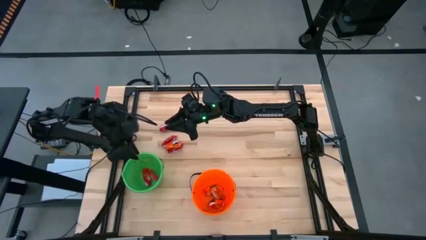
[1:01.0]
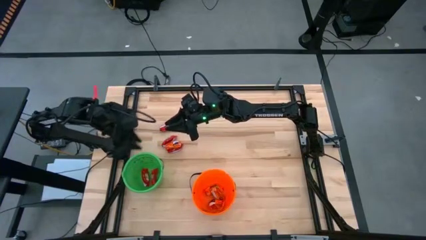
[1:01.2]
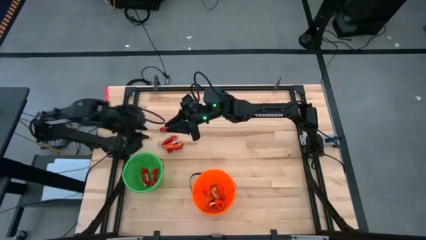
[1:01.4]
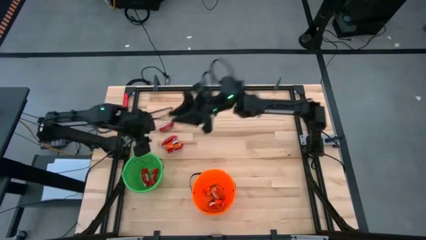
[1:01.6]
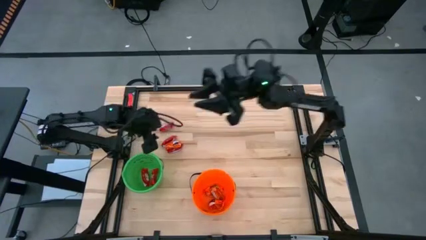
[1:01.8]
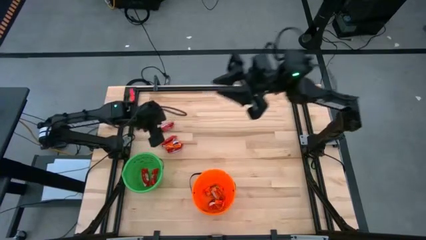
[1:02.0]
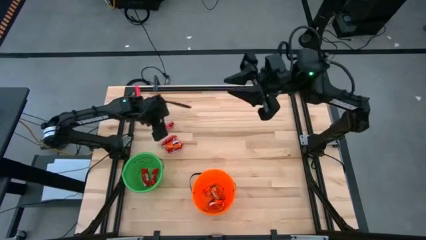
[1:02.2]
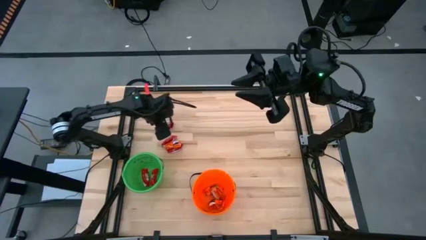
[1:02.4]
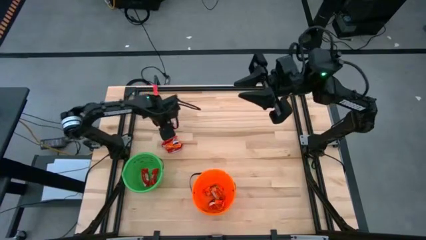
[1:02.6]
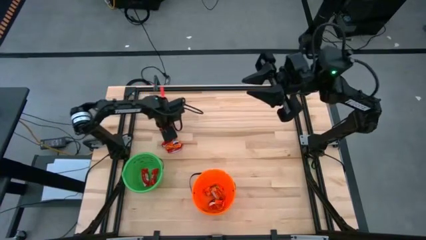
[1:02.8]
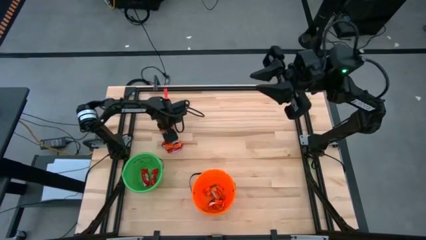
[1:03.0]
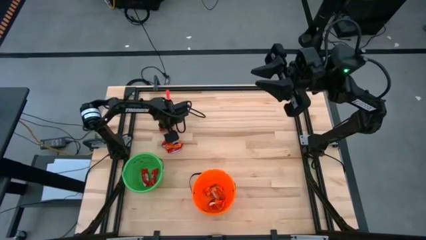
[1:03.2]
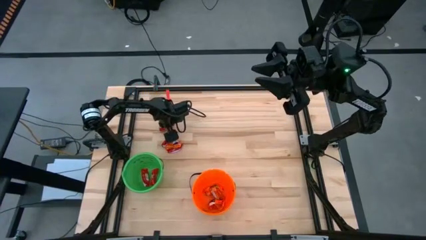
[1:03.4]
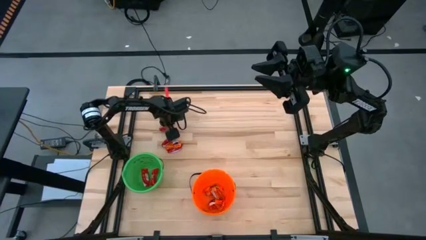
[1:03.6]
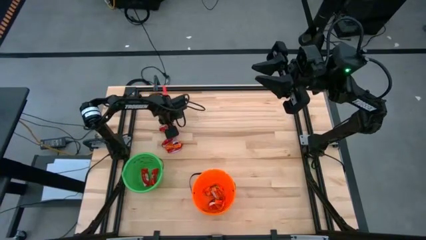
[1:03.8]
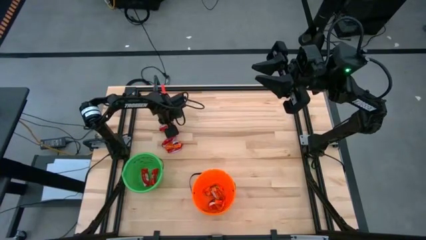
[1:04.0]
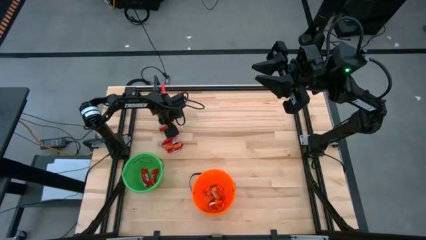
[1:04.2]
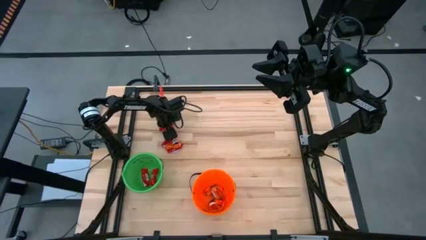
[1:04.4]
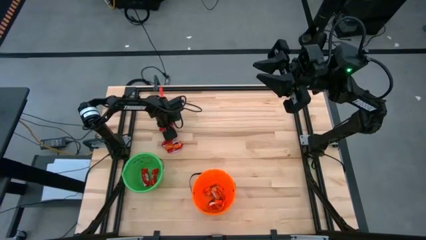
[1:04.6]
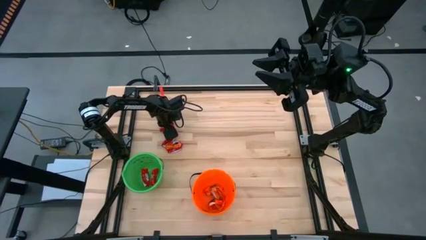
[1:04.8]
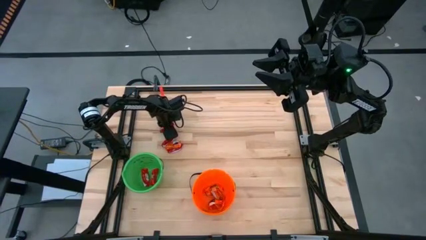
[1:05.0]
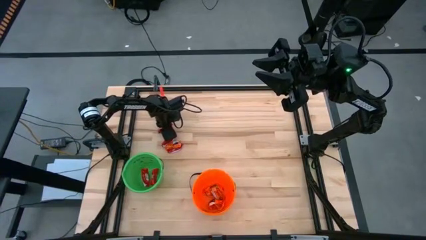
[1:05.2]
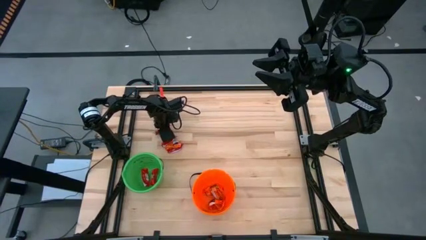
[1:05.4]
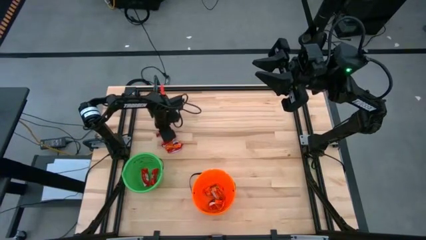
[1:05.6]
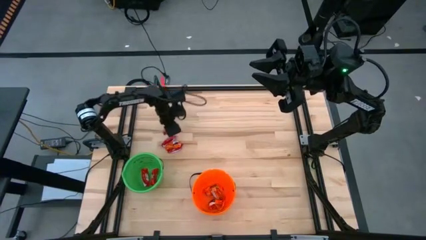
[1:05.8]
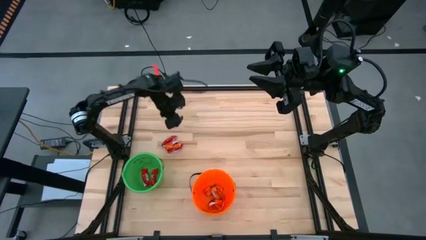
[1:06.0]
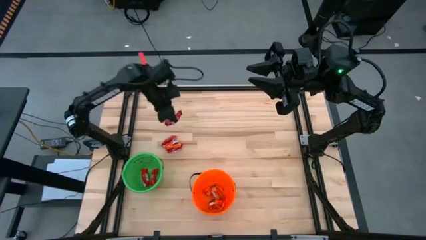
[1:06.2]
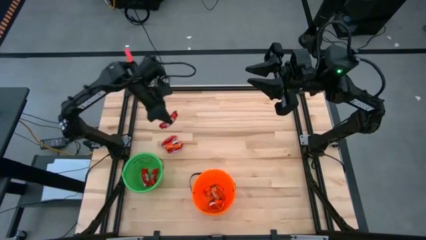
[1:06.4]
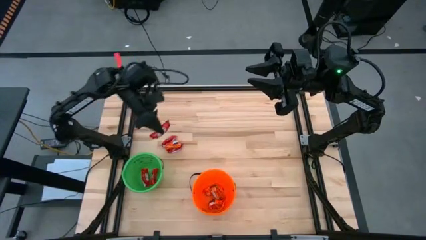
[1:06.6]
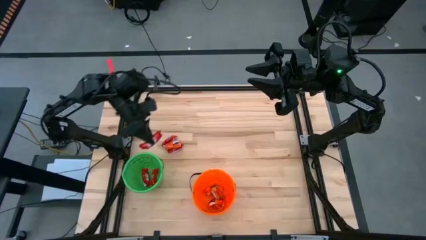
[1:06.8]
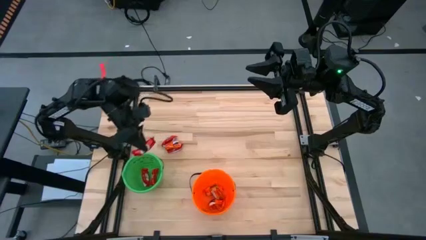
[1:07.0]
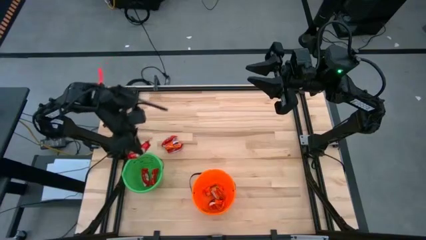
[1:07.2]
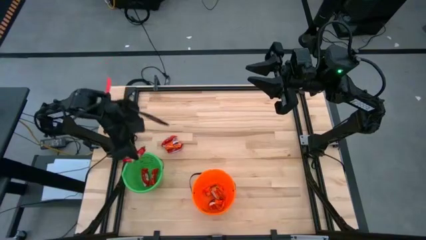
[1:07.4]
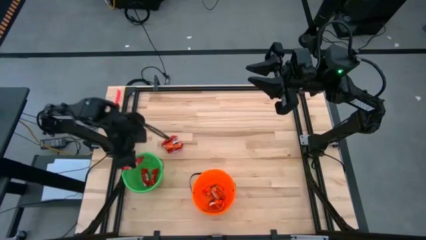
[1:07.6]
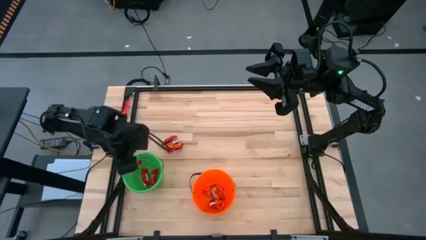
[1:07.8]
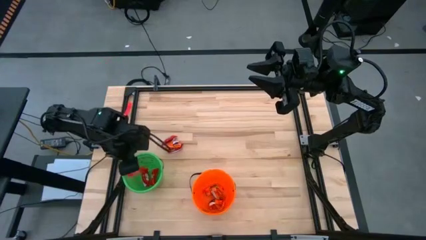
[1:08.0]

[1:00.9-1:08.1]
Put the red chocolate into the green bucket

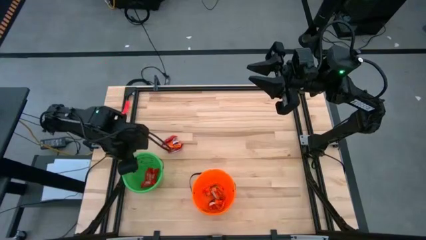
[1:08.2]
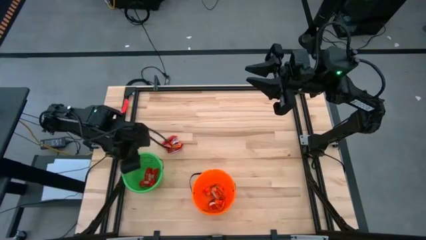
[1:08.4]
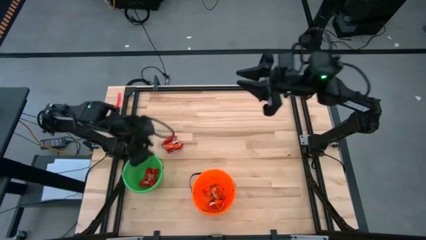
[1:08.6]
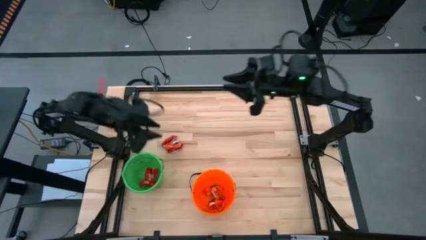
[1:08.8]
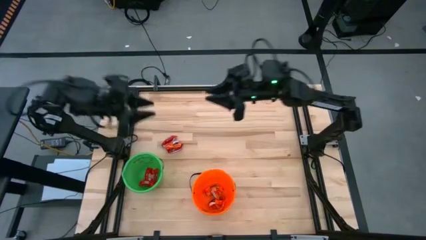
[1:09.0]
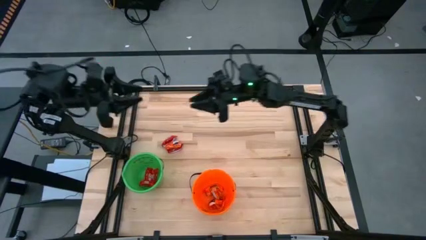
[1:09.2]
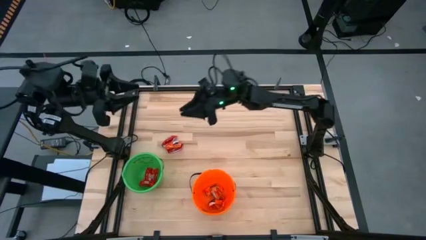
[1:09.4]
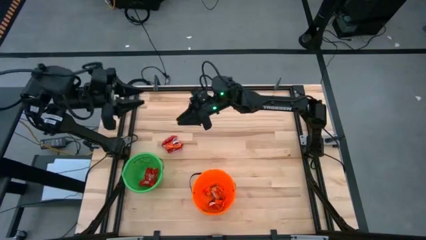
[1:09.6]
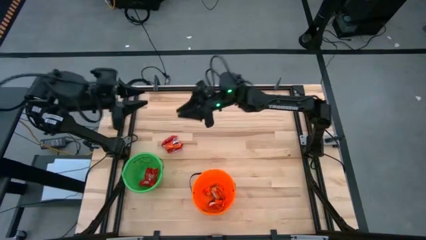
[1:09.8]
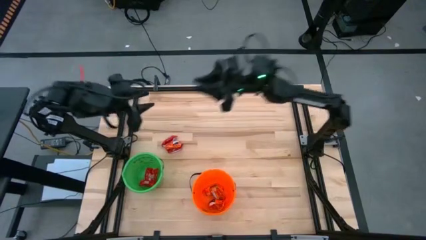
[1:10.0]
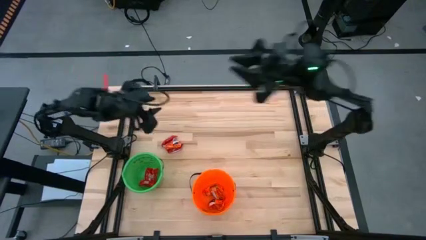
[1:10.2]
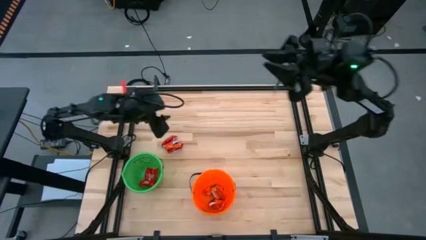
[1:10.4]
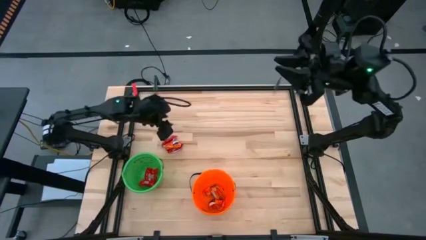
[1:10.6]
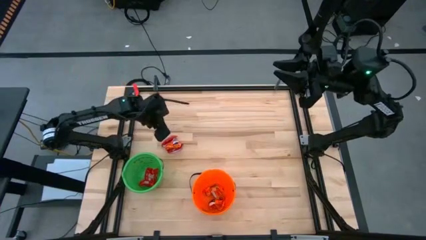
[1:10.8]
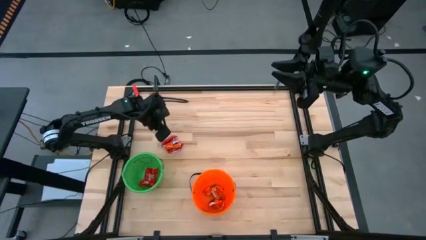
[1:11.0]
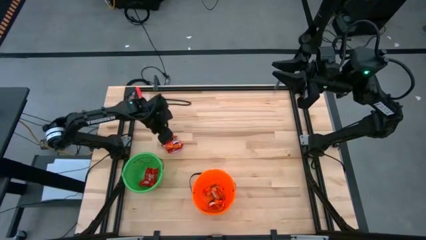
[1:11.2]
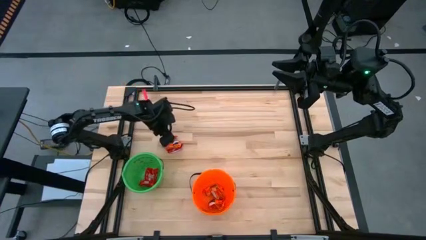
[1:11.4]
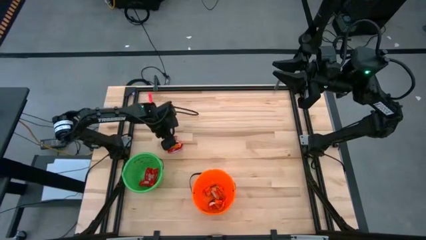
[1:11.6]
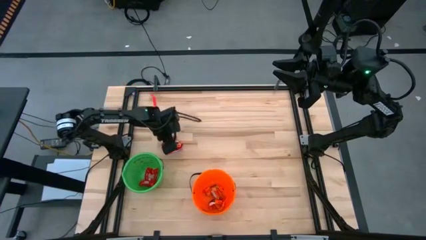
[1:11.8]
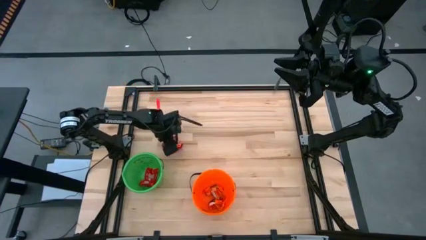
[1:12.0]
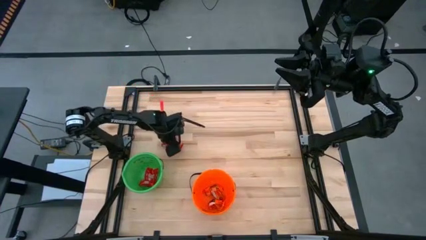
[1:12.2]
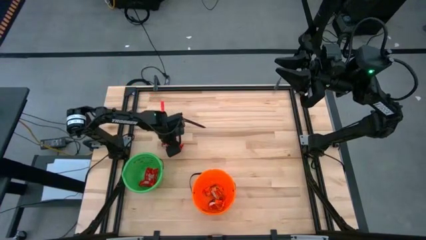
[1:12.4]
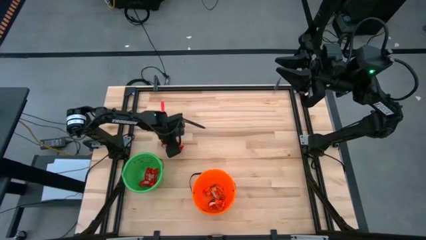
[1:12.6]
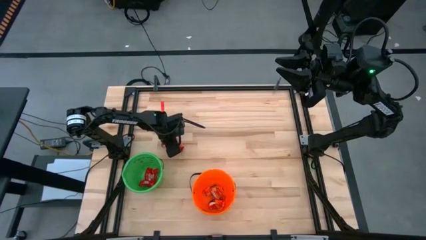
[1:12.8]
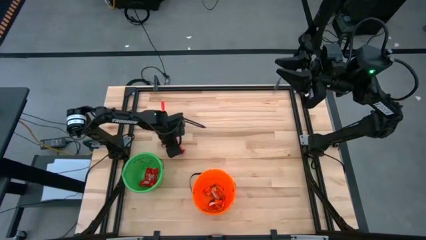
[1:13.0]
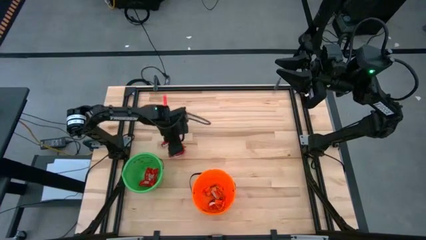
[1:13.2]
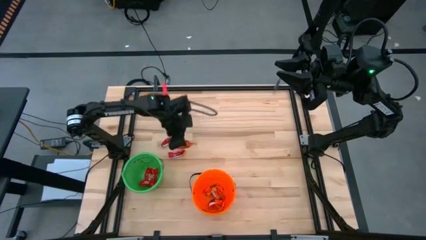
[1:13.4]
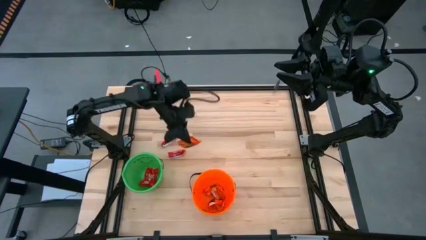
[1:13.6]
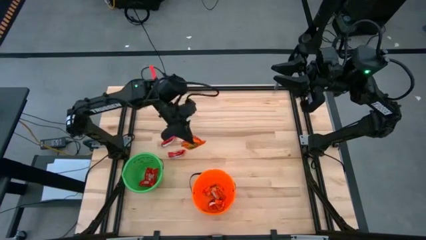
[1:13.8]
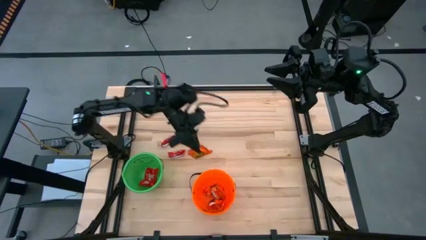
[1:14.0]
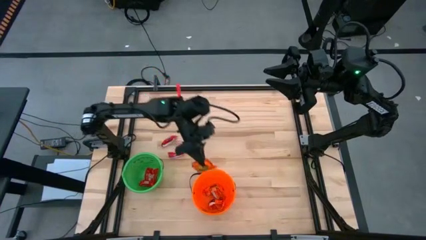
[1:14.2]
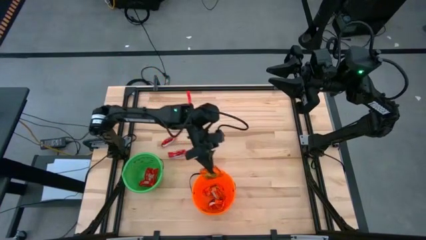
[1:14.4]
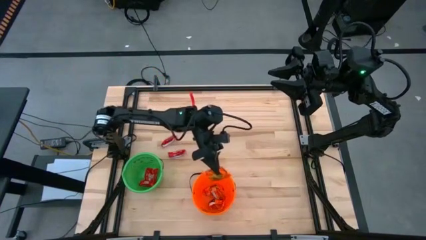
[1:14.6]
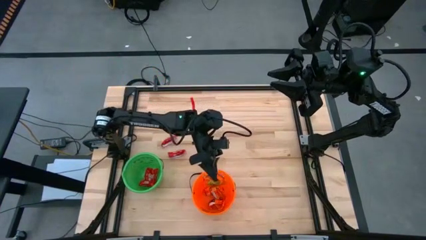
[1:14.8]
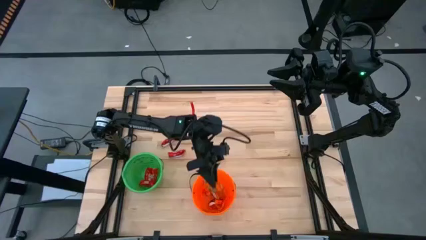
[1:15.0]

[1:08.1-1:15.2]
Put the orange chocolate into the orange bucket
